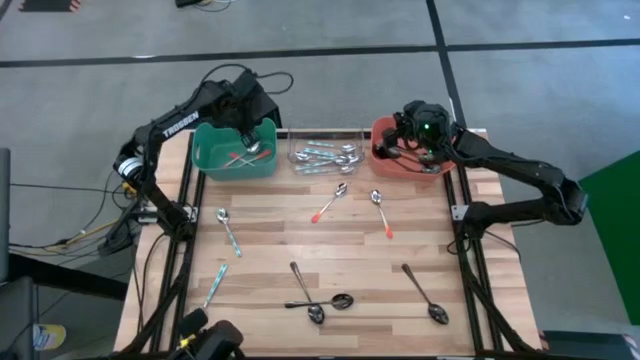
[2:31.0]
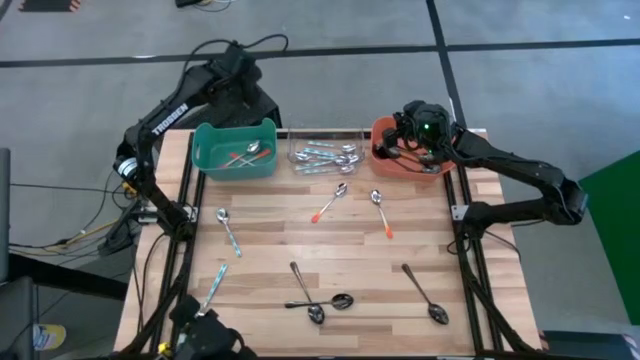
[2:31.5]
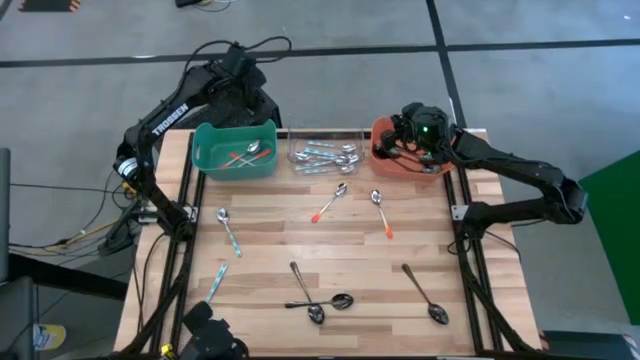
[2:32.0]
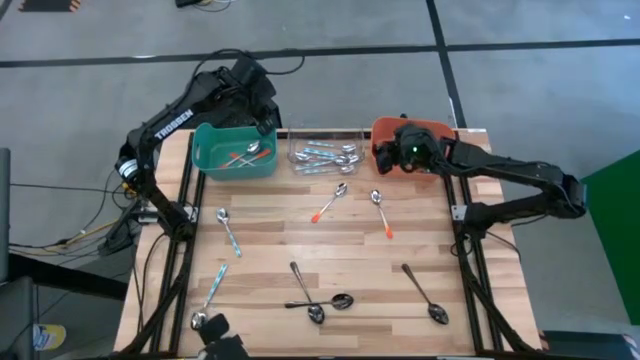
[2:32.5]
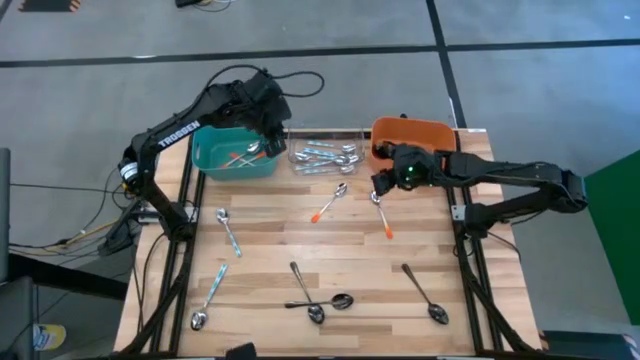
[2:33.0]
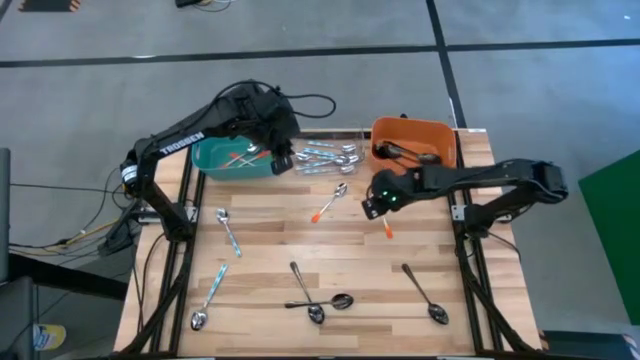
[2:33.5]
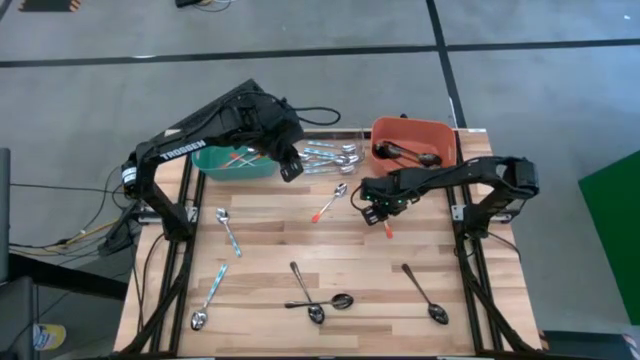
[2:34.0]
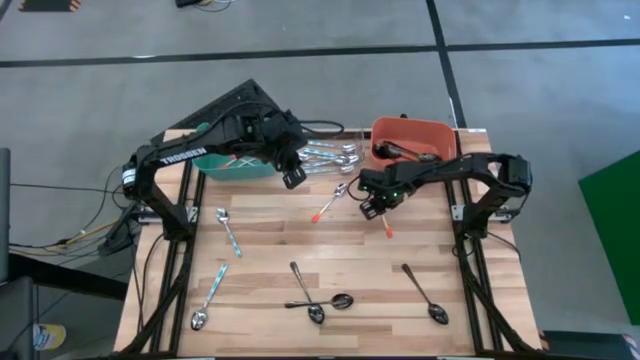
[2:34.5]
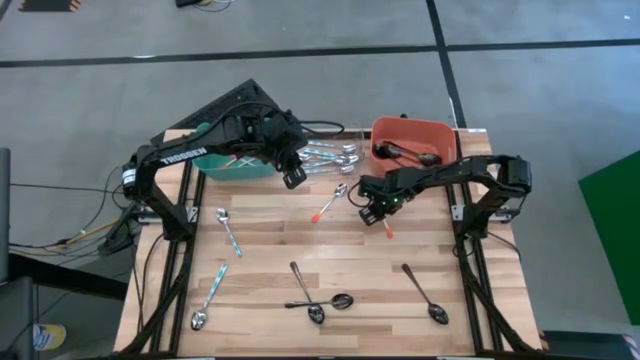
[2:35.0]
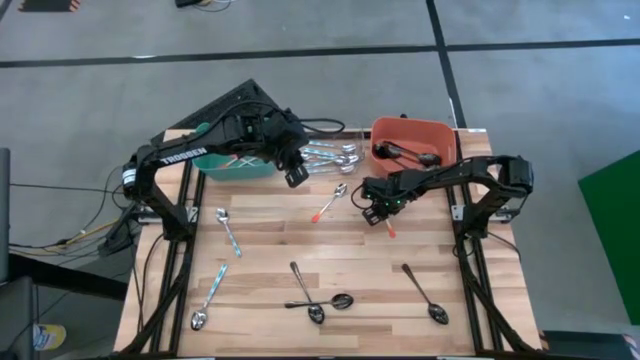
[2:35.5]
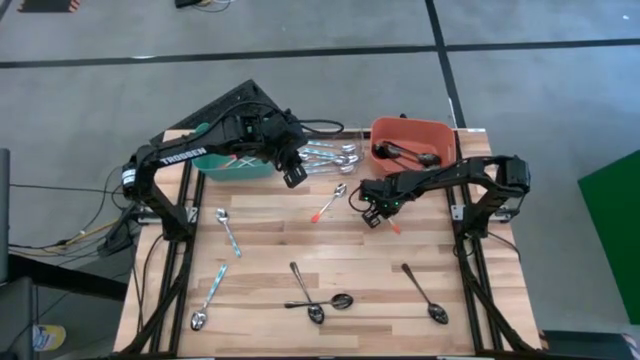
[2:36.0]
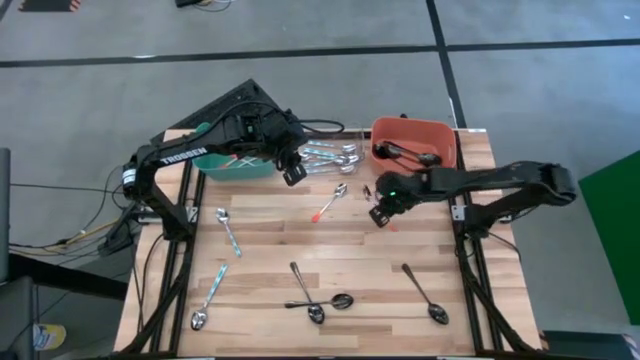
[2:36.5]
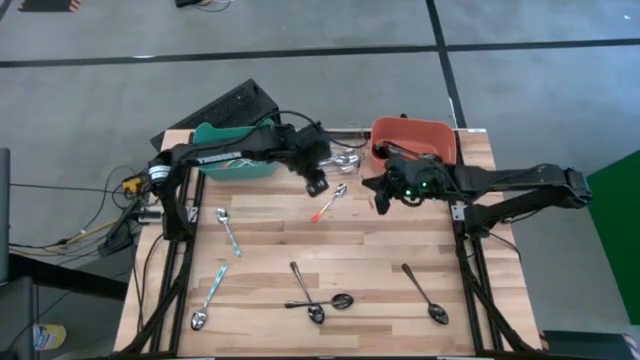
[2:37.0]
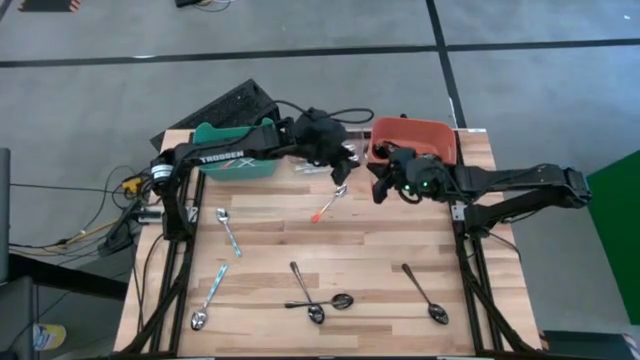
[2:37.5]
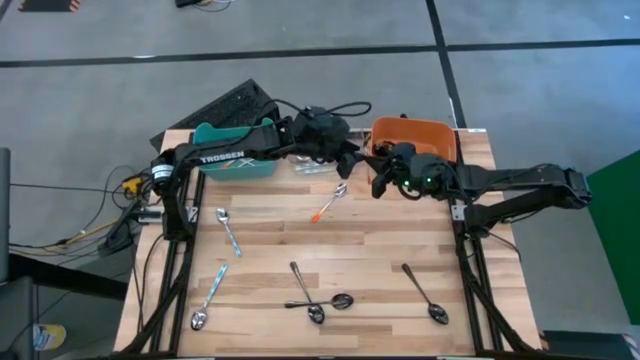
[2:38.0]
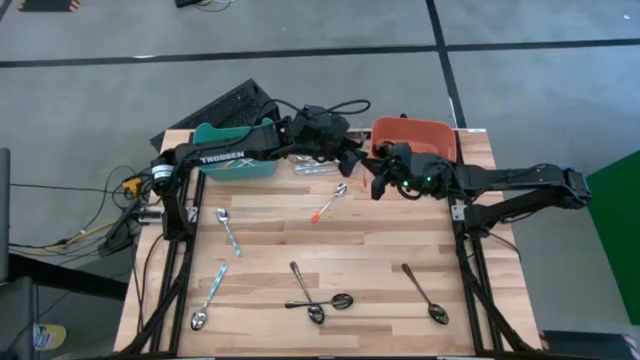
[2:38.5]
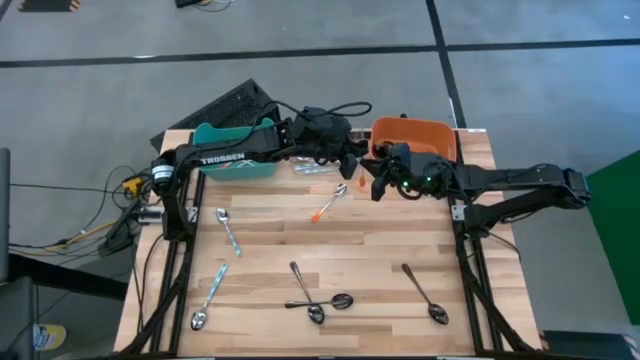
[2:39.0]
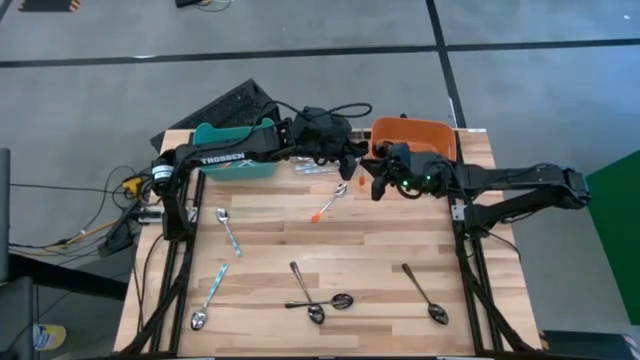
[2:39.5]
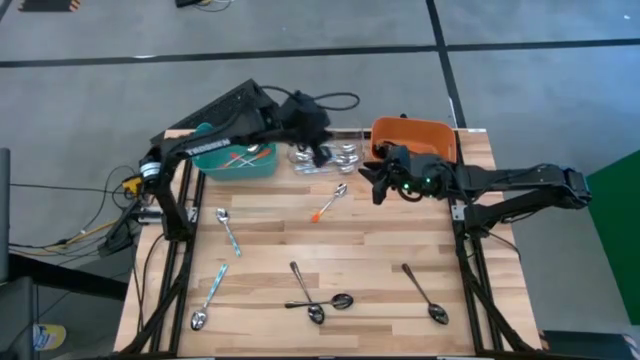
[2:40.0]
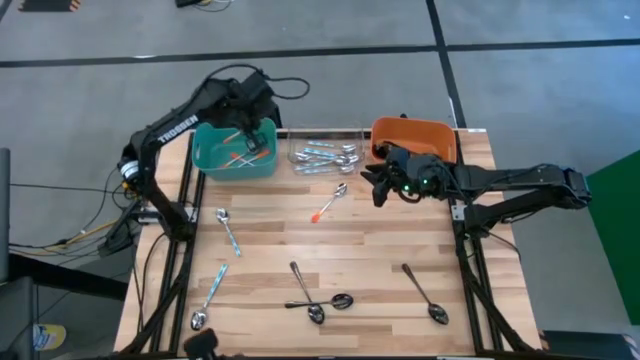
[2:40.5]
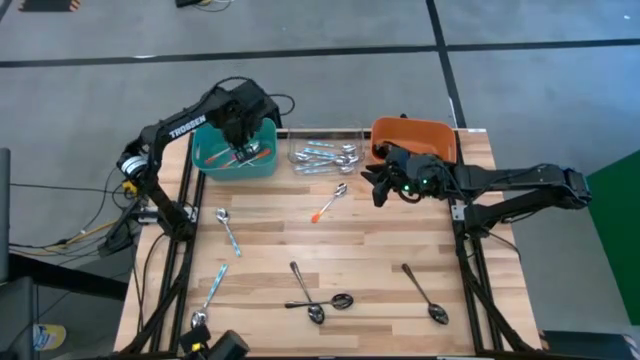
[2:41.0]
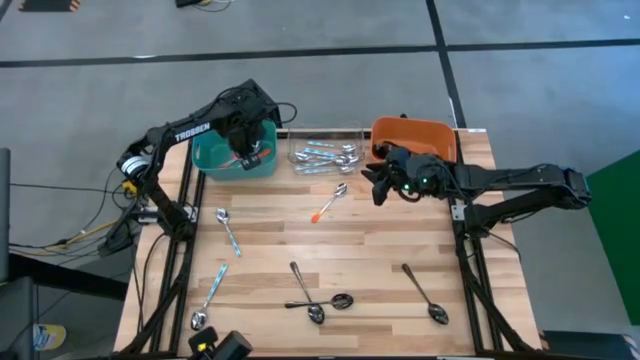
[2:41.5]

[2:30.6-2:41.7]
Task: Sort silverware by color (type)
Put the orange spoon into the green bin

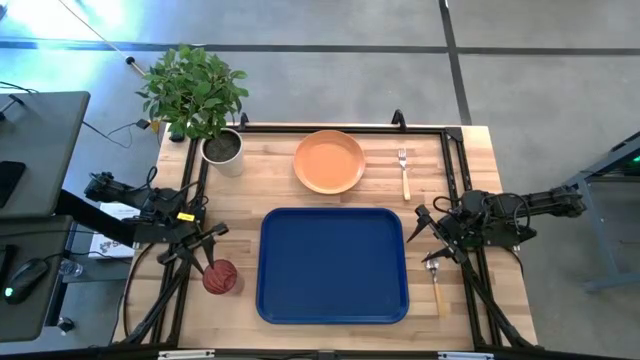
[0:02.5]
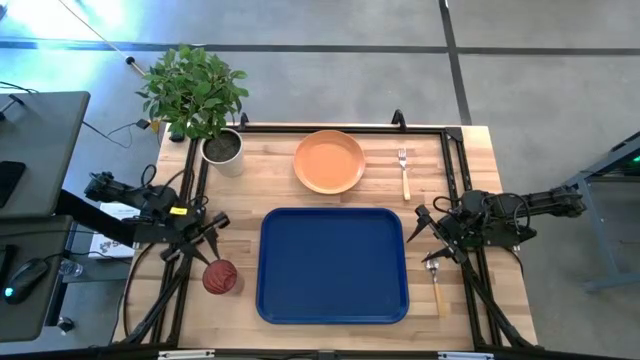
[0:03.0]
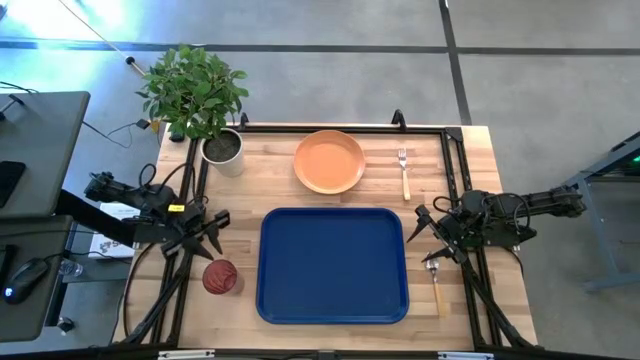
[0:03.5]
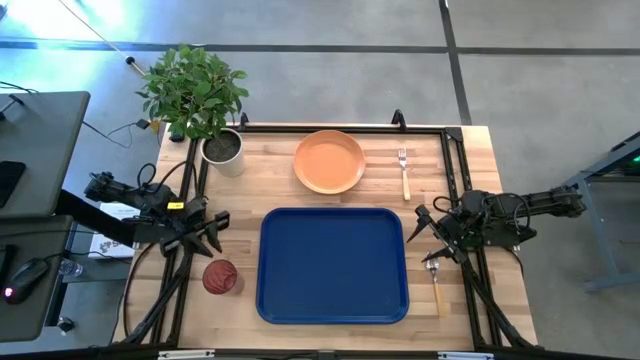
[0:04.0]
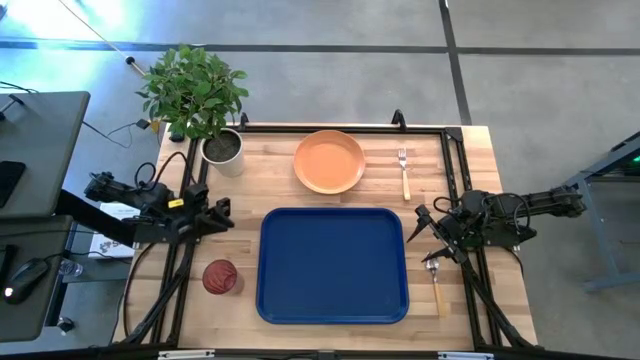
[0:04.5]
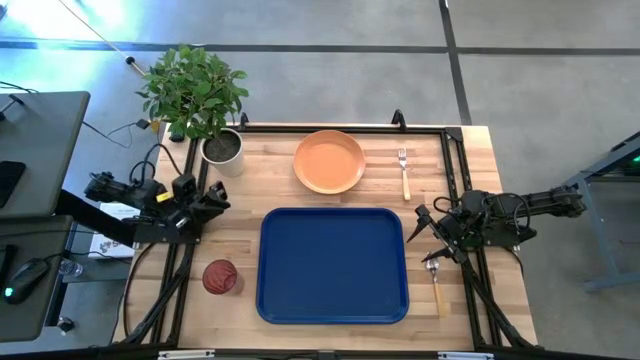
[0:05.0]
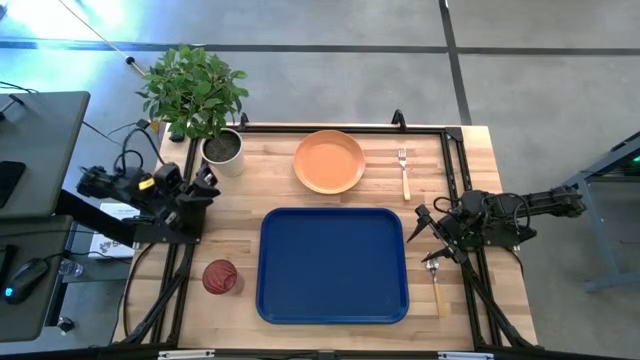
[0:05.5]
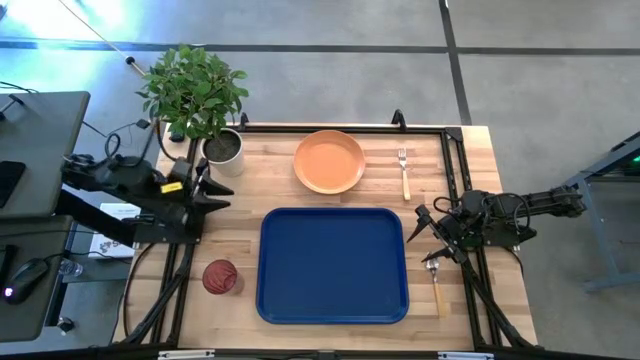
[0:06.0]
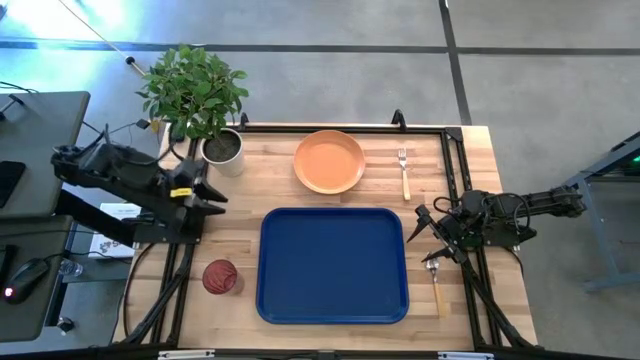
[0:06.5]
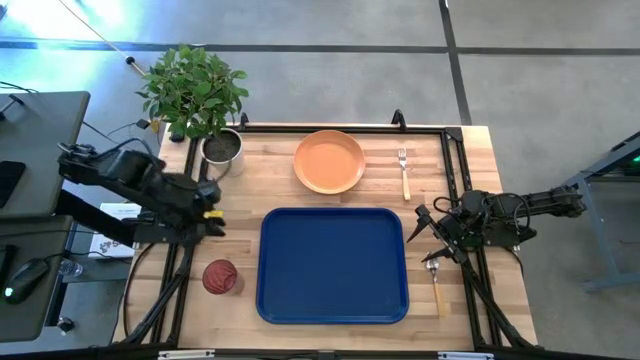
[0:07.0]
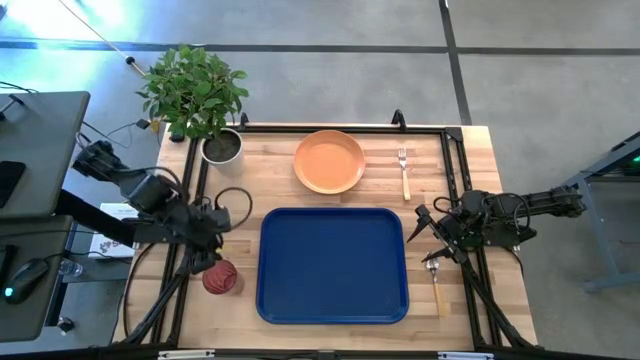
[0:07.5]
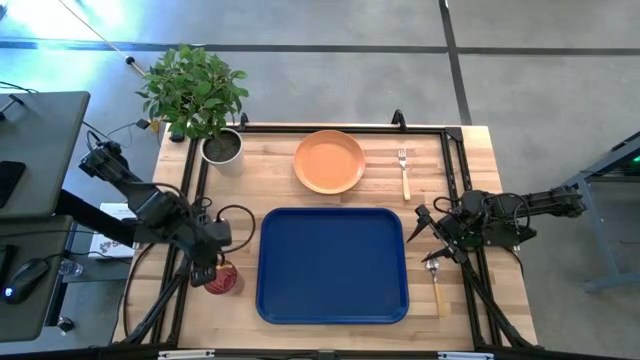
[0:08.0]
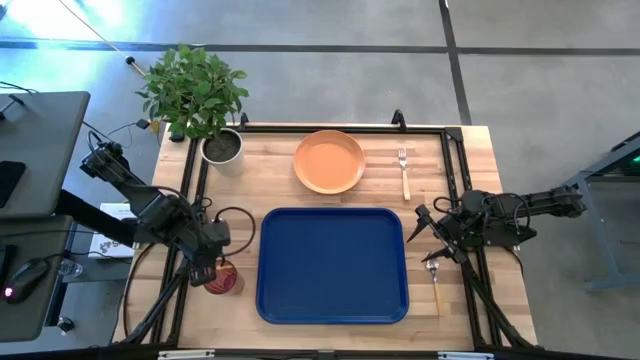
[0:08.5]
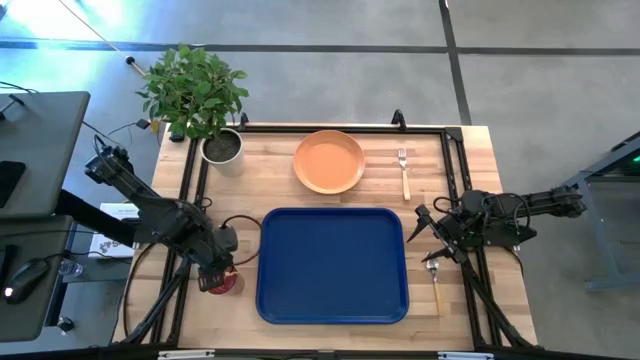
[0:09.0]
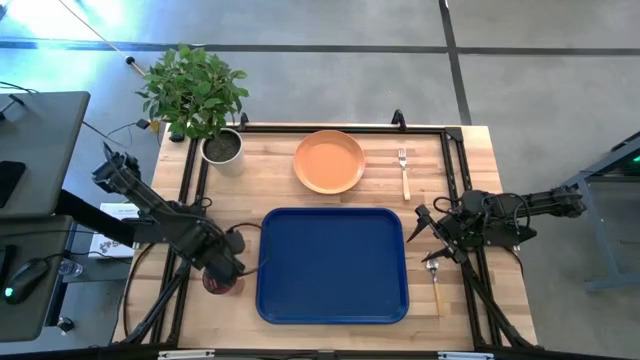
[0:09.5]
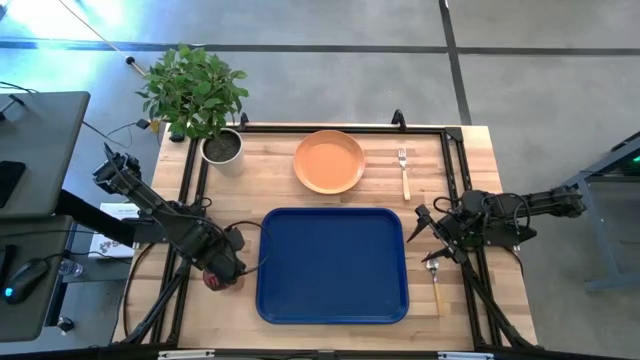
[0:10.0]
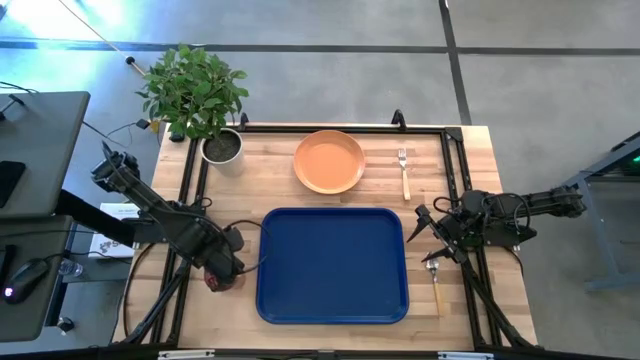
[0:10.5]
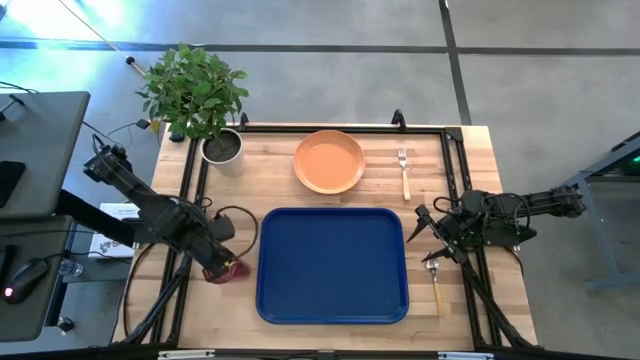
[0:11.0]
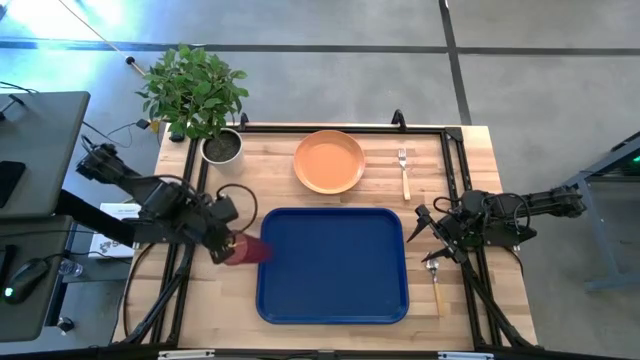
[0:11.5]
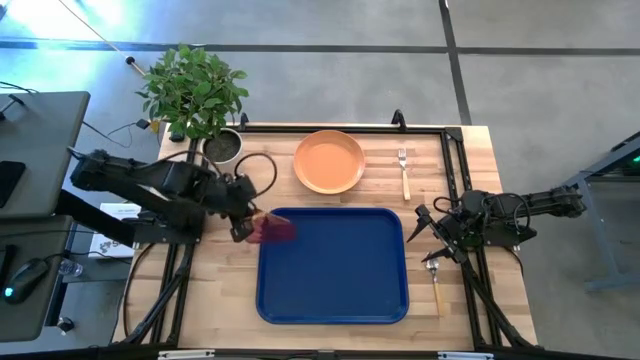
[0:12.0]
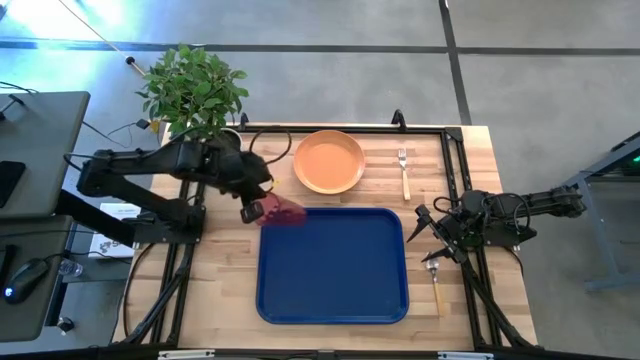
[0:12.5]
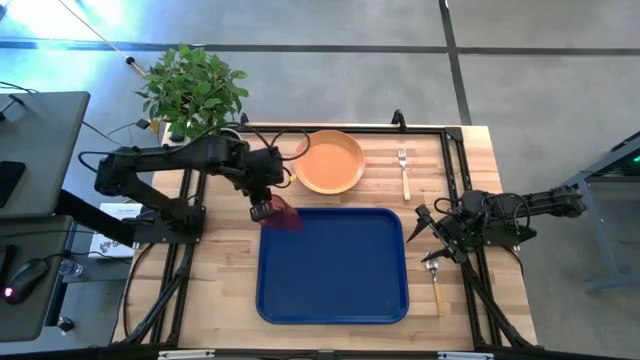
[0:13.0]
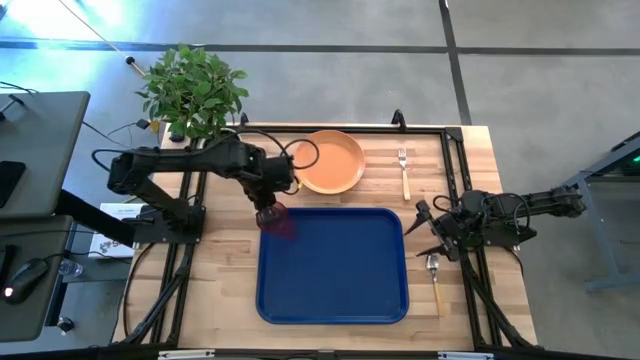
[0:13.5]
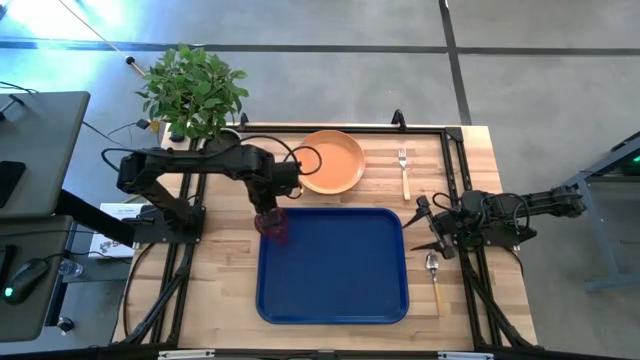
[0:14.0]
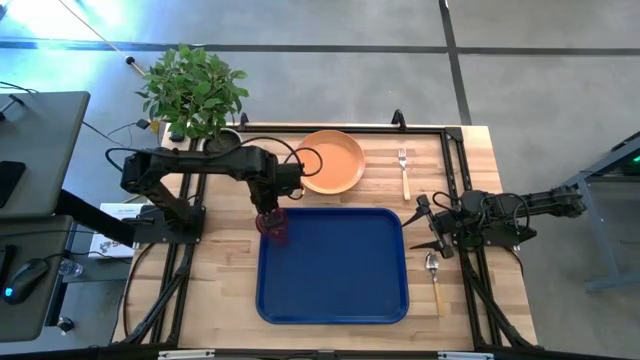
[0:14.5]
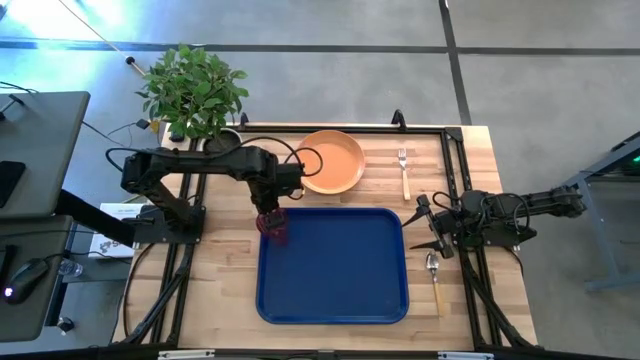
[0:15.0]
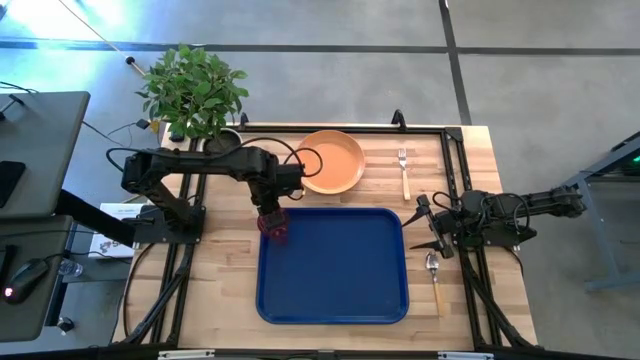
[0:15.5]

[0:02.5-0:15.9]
Task: Pick and place plate/cup/fork/spoon on tray
Put the red cup on the top left of the blue tray
